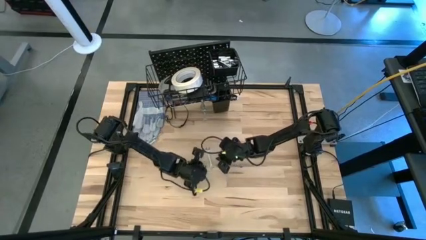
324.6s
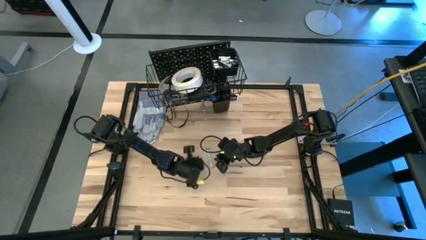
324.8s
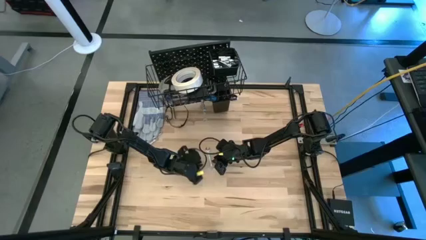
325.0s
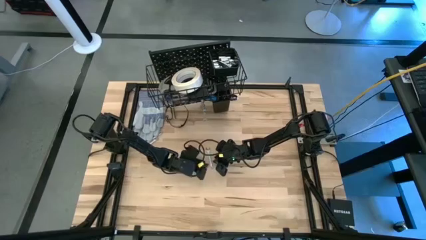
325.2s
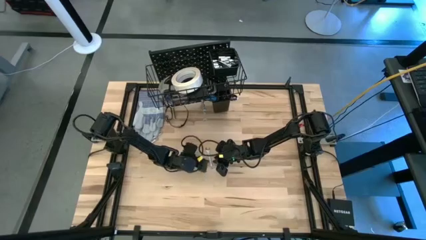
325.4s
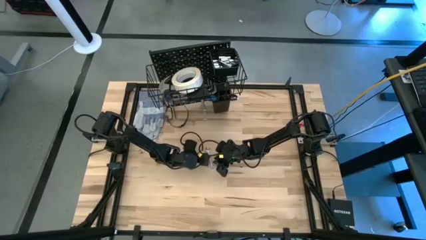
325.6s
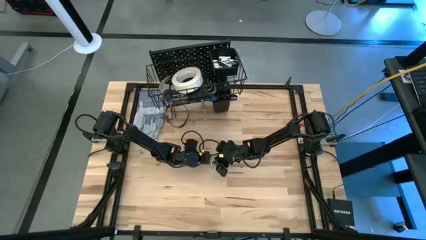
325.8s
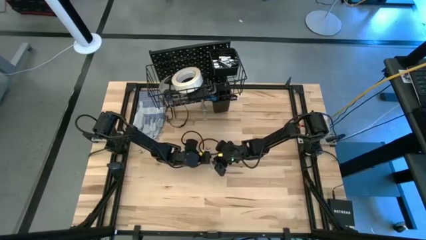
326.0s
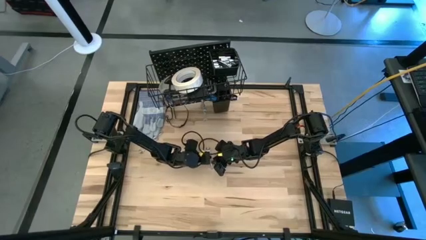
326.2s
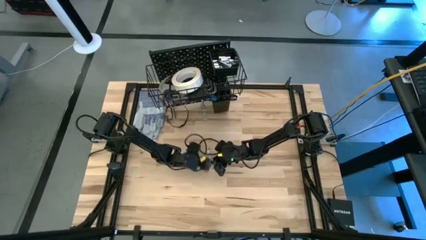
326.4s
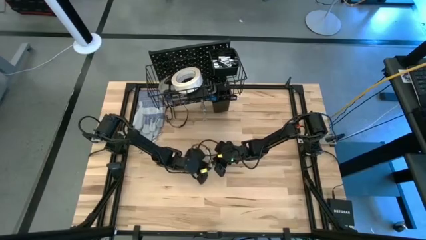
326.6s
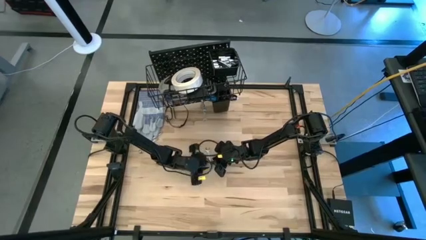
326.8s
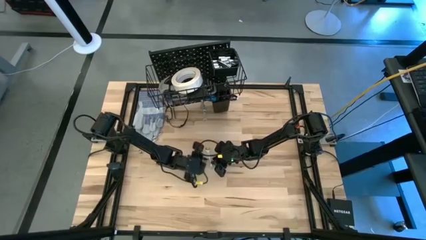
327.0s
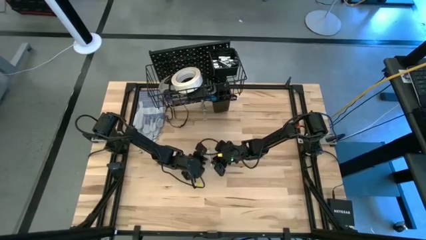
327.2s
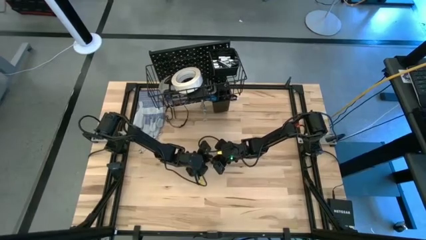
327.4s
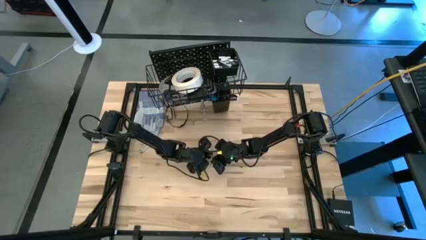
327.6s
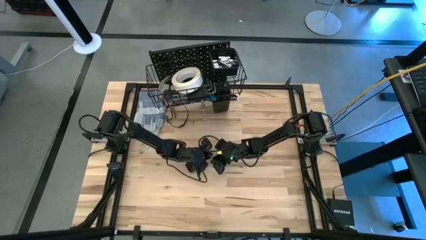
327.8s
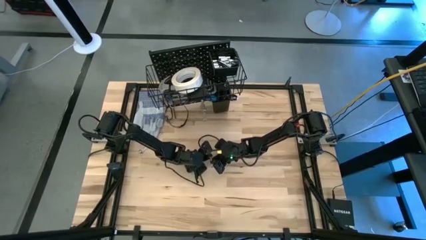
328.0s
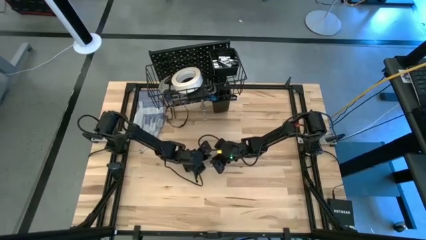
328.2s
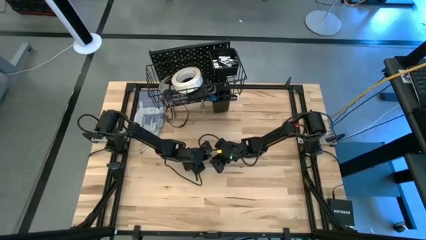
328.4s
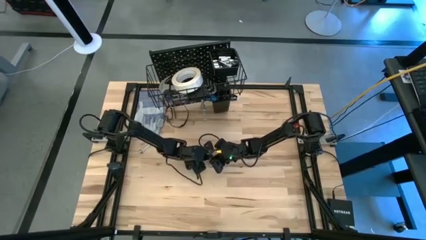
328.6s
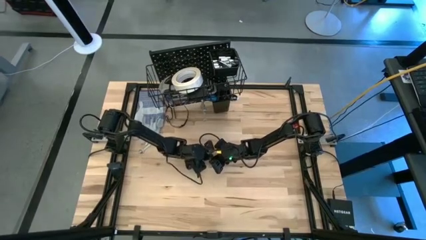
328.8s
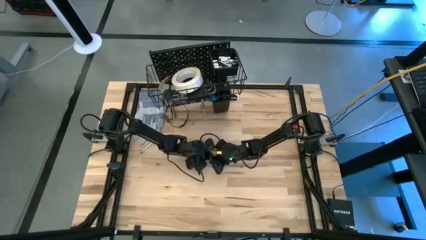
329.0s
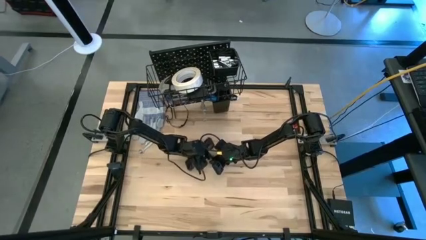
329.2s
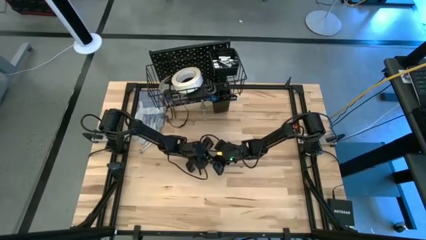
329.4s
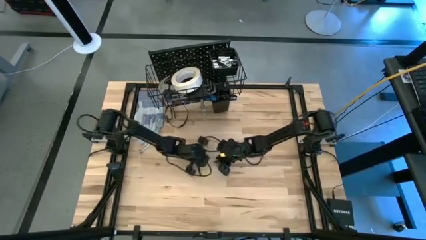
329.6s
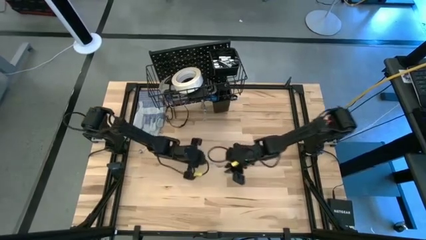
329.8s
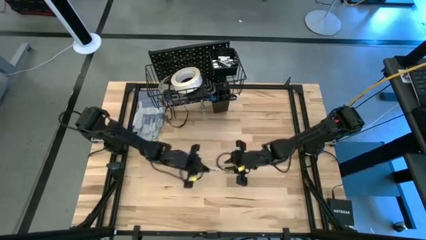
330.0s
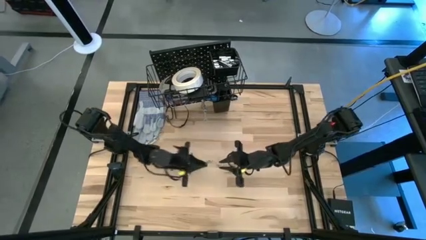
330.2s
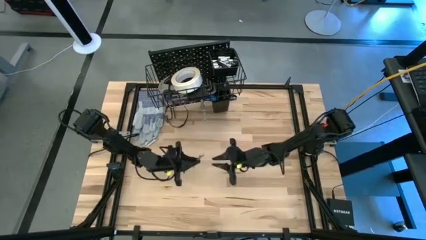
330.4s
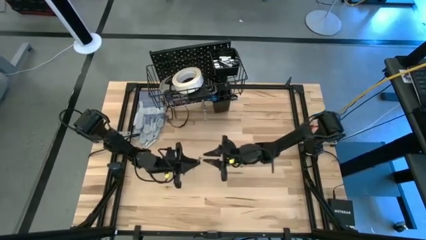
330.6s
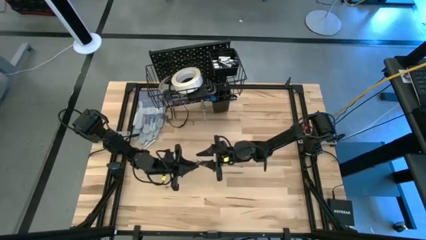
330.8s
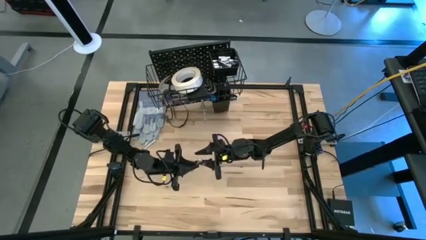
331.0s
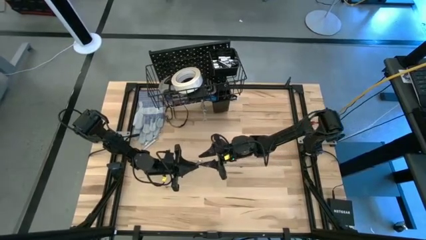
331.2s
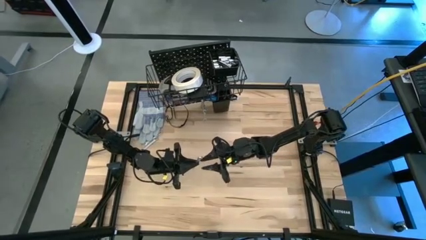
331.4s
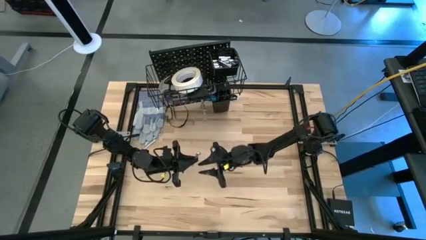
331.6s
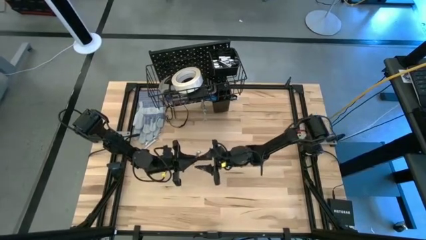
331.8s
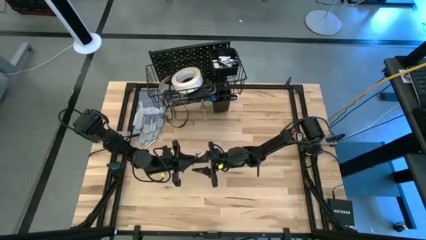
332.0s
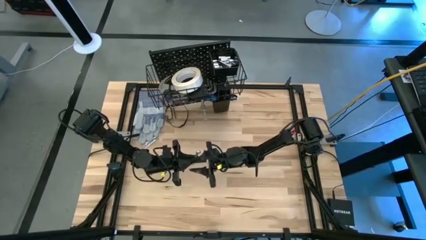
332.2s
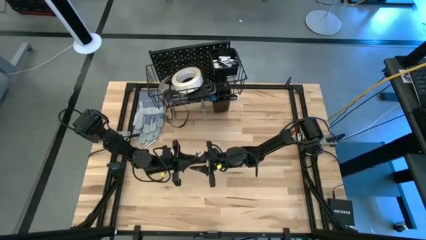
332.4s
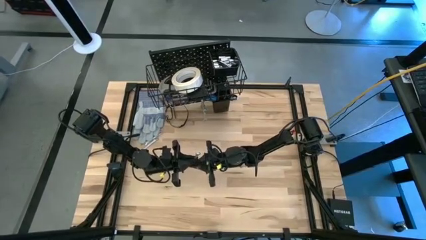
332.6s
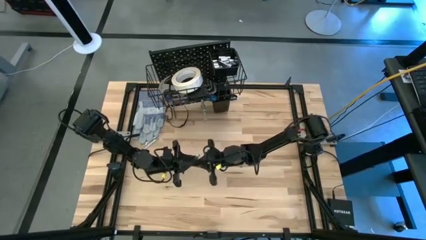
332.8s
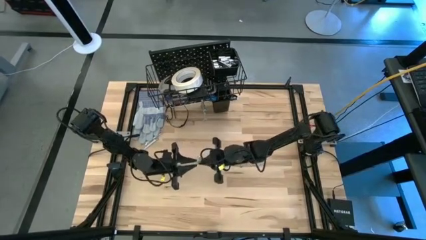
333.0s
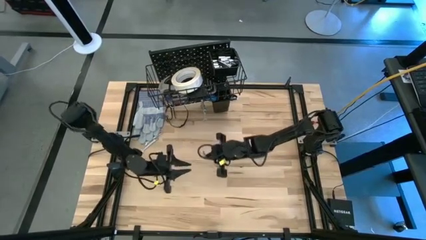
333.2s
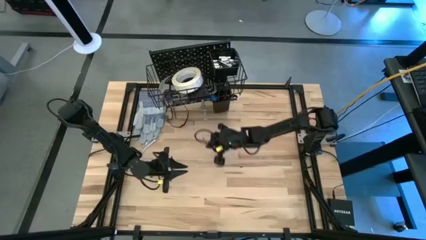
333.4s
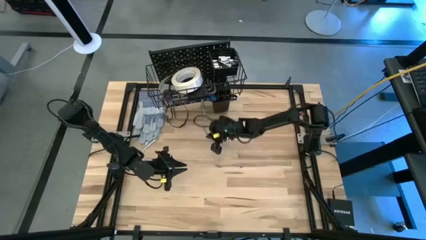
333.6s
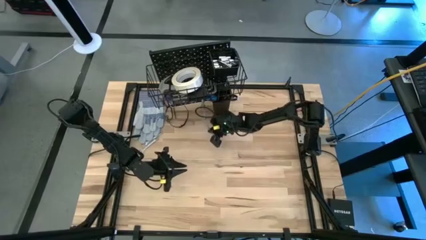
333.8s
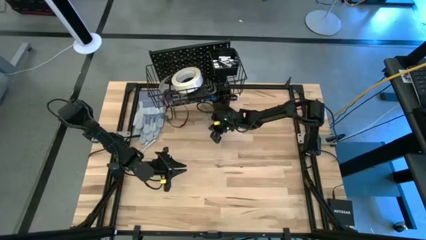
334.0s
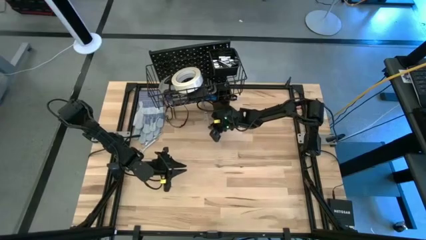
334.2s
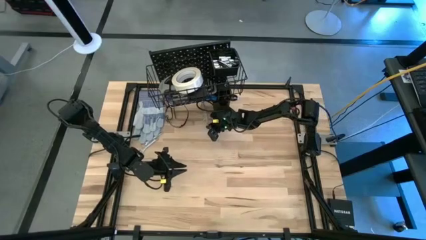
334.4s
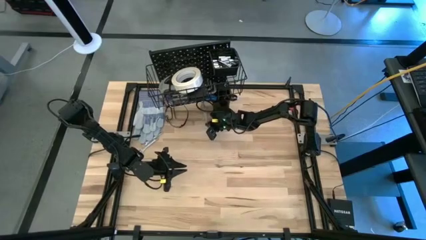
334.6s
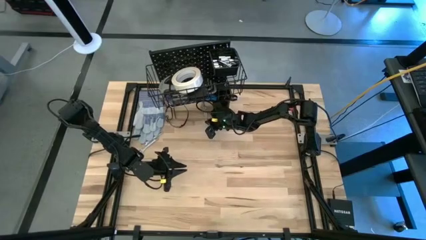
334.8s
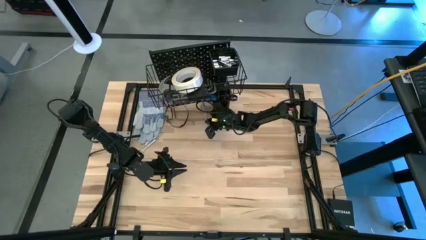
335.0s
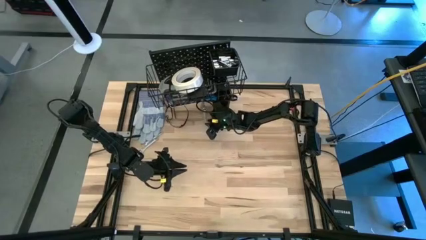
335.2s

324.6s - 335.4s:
Task: Hang tools onto peg board
Hang the wrench on the pegboard

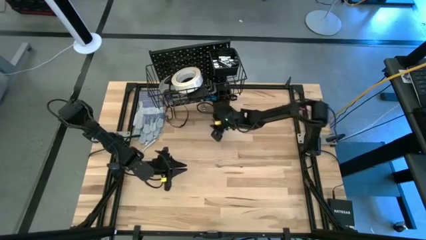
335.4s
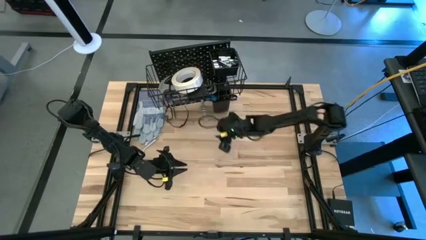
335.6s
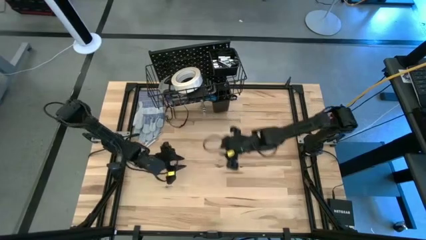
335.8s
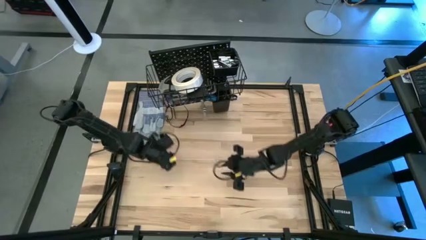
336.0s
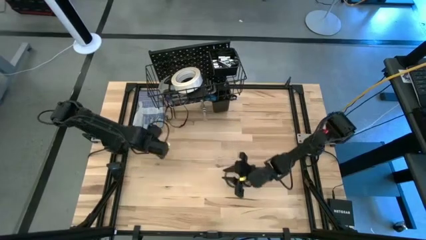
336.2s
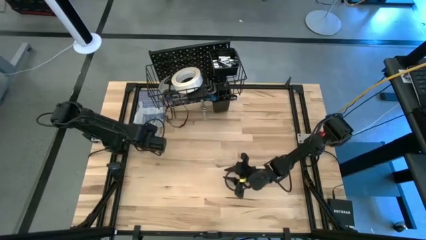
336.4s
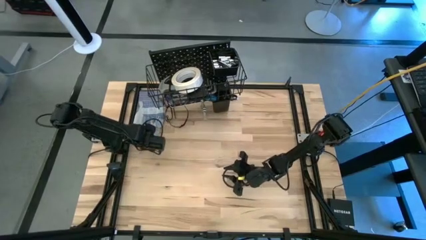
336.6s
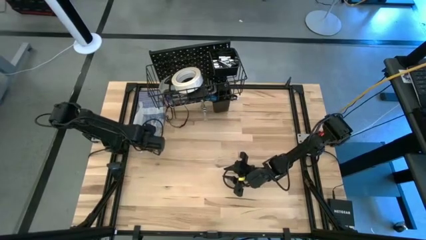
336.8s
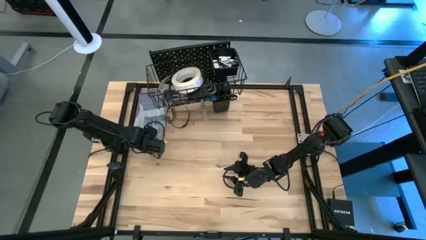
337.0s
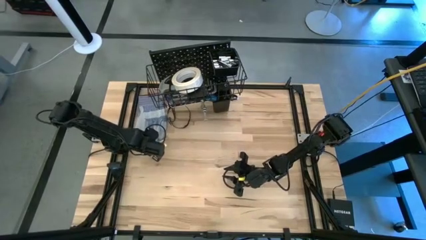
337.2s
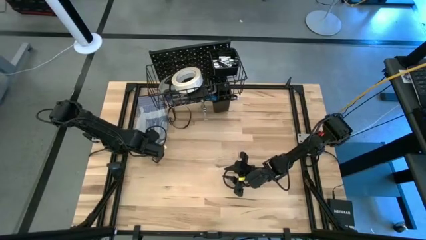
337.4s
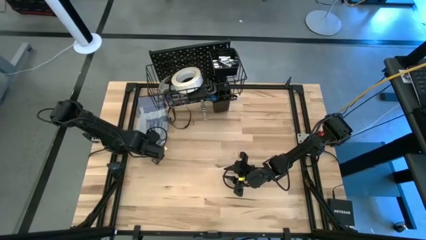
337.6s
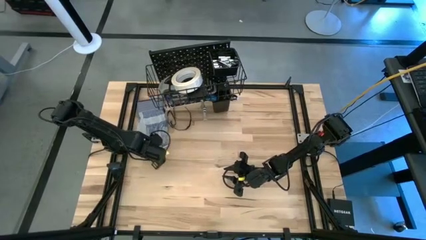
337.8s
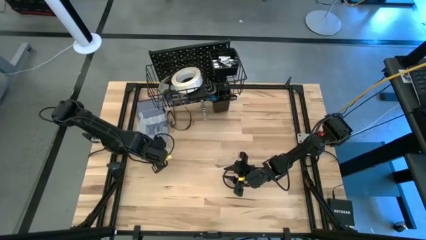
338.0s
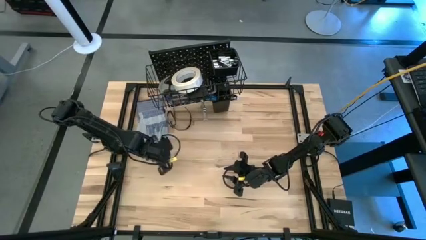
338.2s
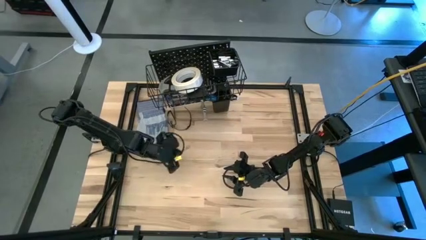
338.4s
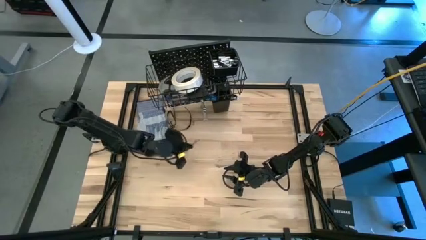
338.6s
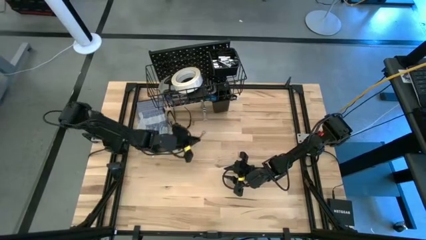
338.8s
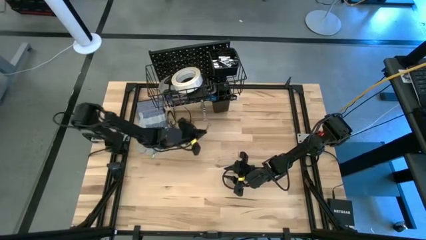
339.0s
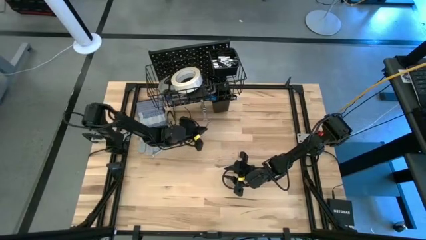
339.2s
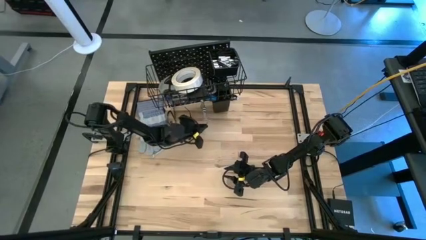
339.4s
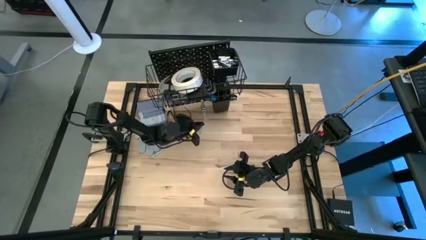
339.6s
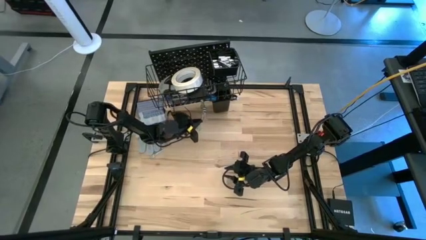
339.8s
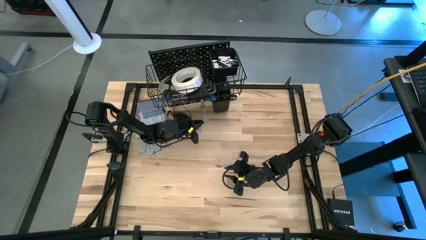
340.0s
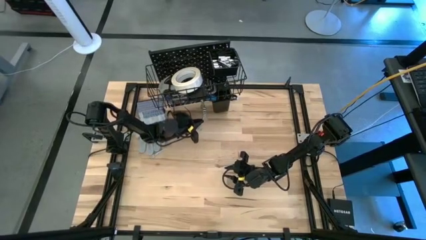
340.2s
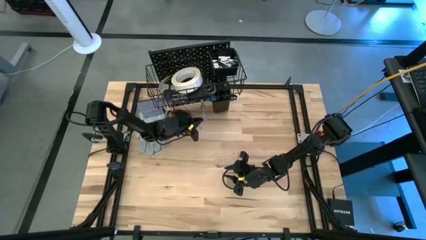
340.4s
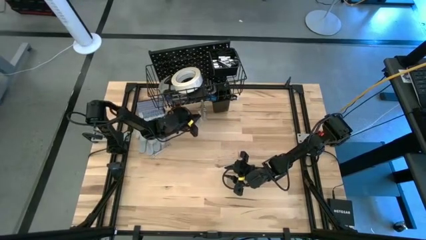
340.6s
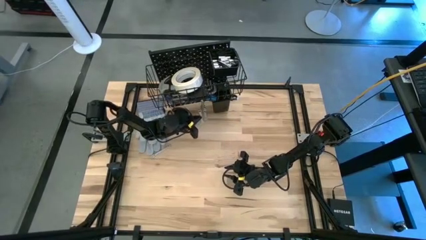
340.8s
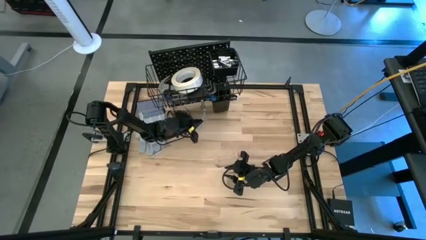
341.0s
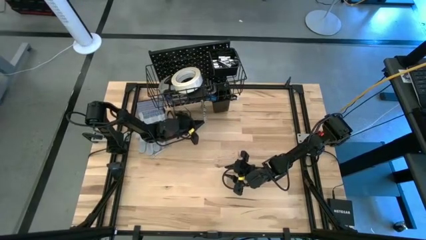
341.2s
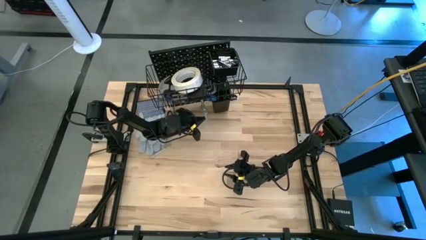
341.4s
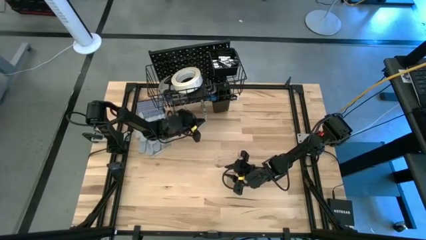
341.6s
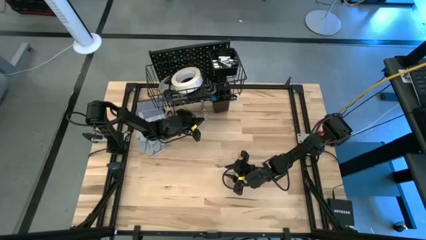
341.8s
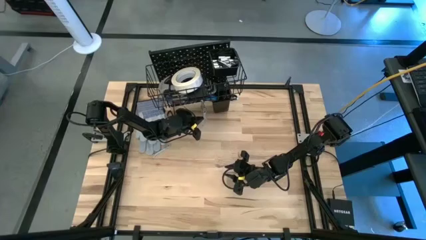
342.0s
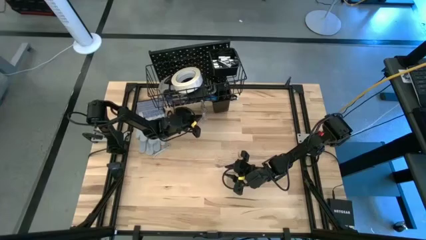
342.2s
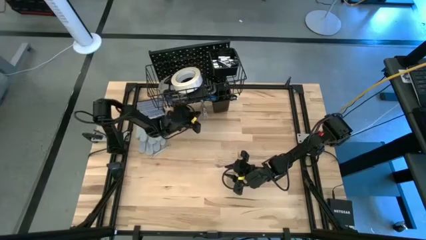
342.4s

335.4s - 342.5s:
Hang the wrench on the pegboard
